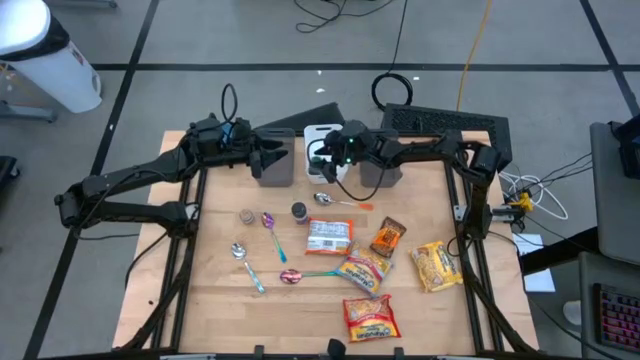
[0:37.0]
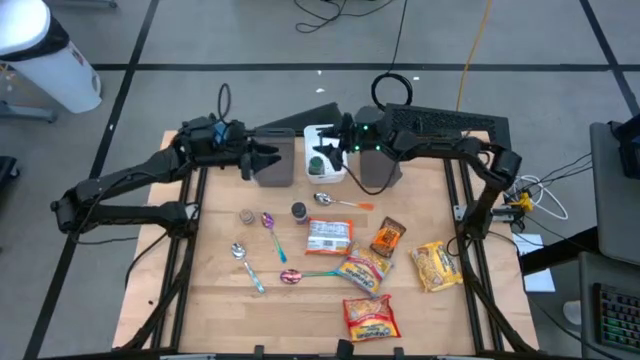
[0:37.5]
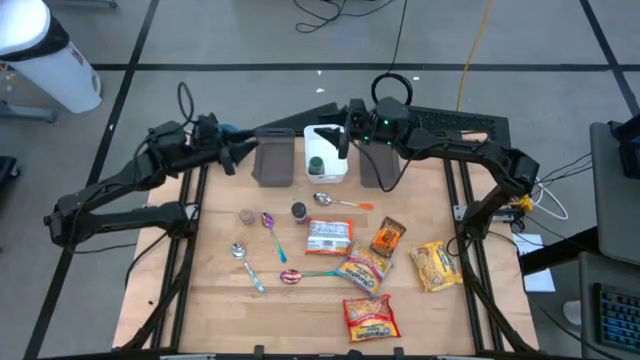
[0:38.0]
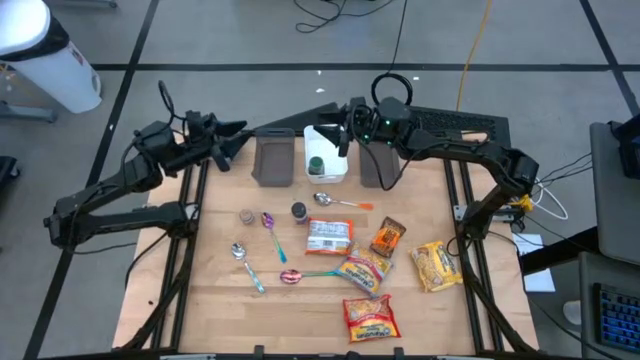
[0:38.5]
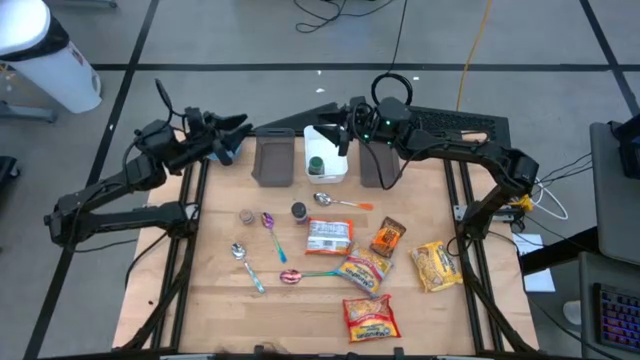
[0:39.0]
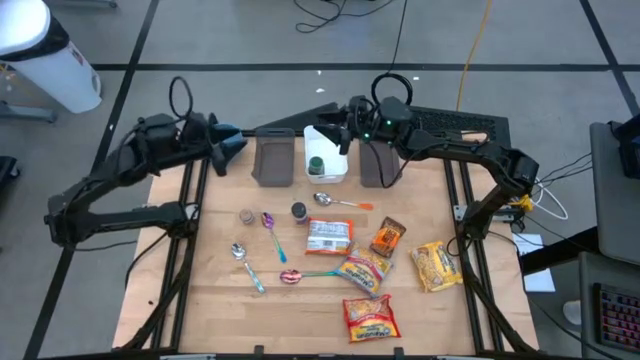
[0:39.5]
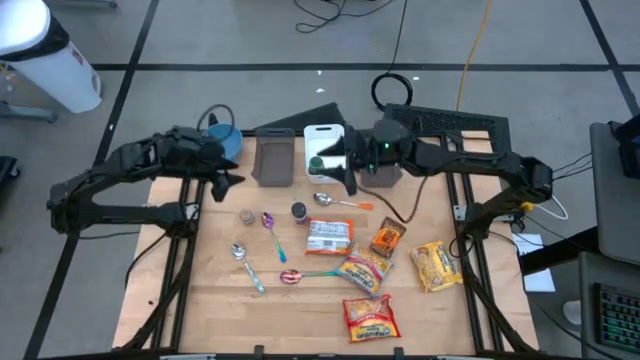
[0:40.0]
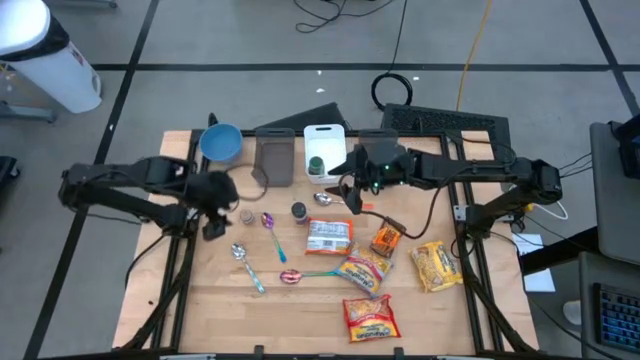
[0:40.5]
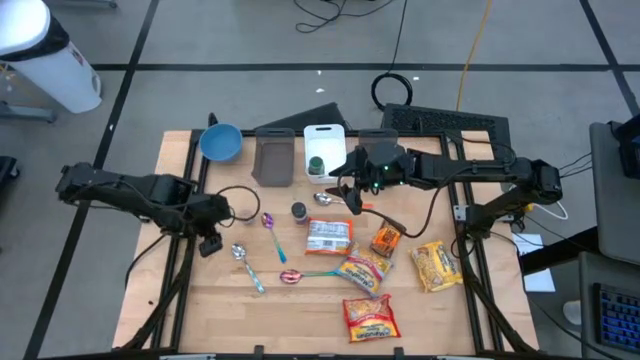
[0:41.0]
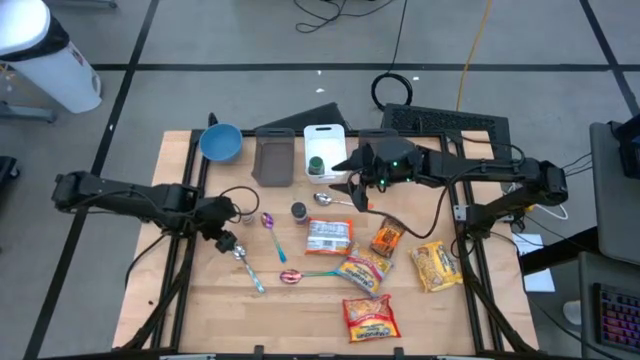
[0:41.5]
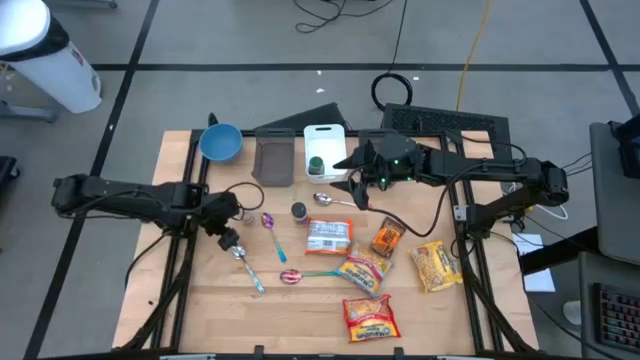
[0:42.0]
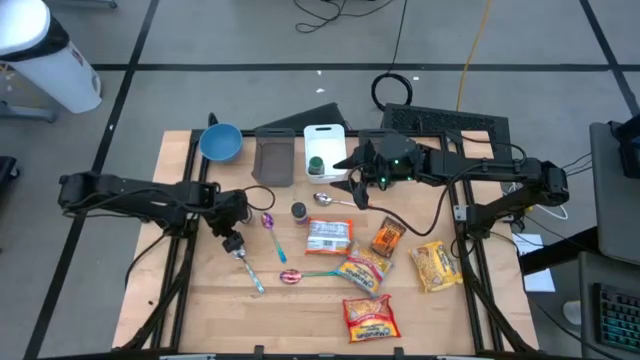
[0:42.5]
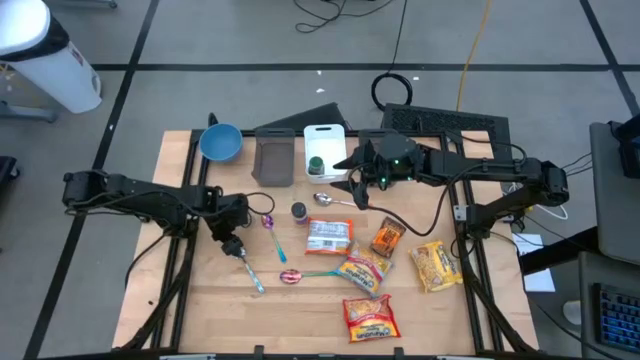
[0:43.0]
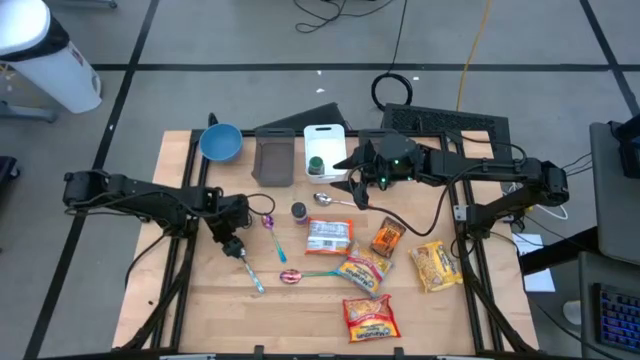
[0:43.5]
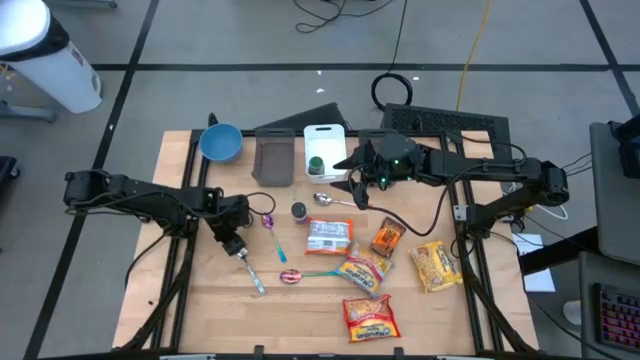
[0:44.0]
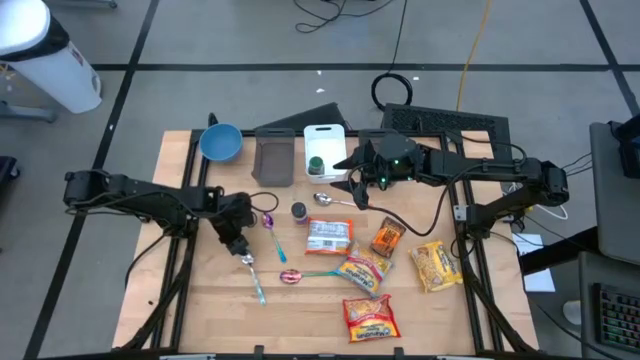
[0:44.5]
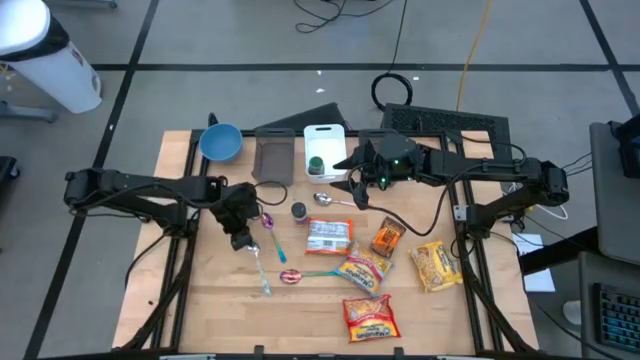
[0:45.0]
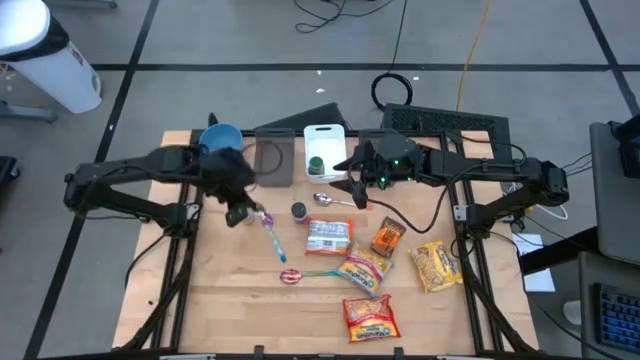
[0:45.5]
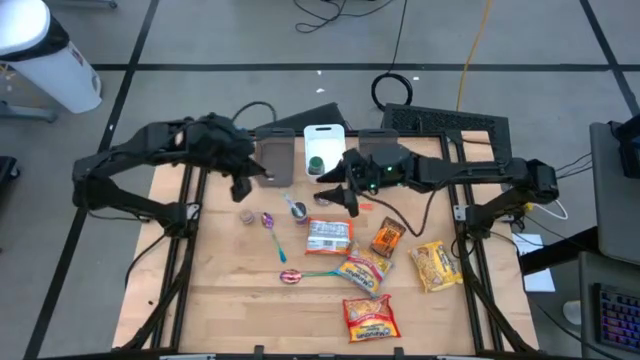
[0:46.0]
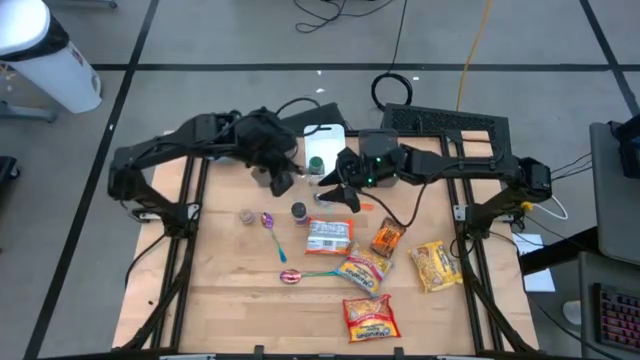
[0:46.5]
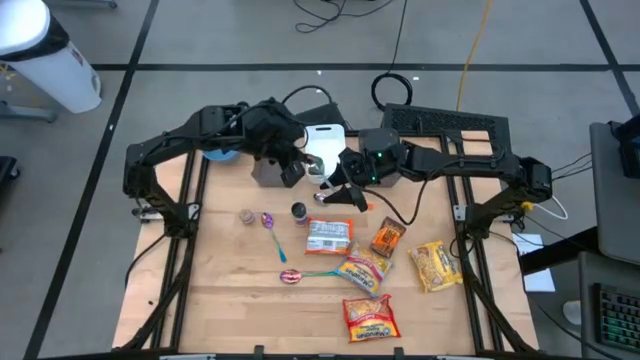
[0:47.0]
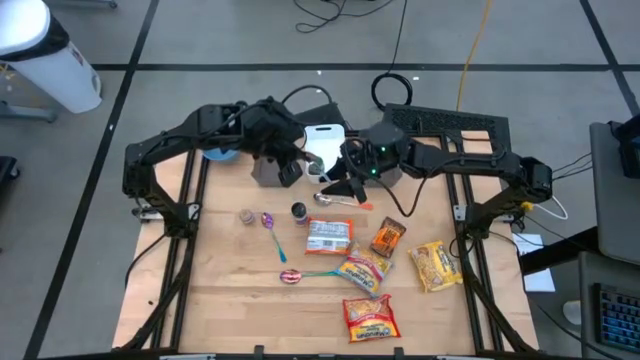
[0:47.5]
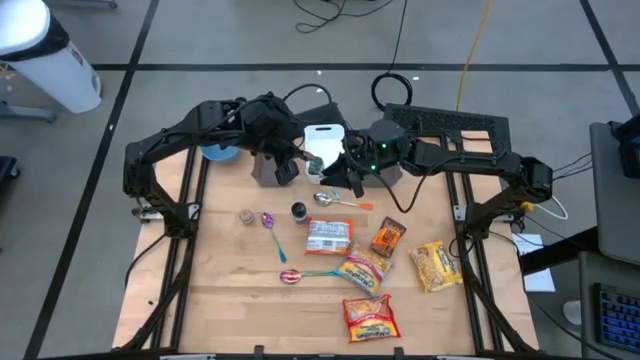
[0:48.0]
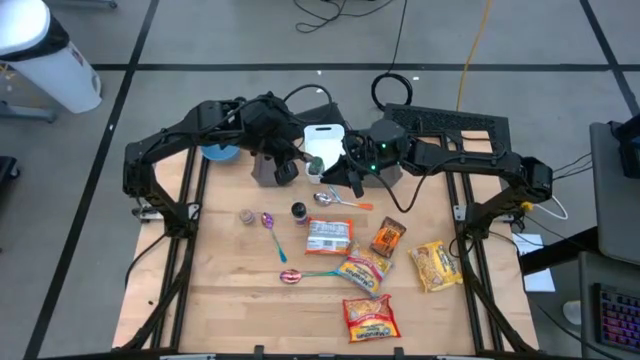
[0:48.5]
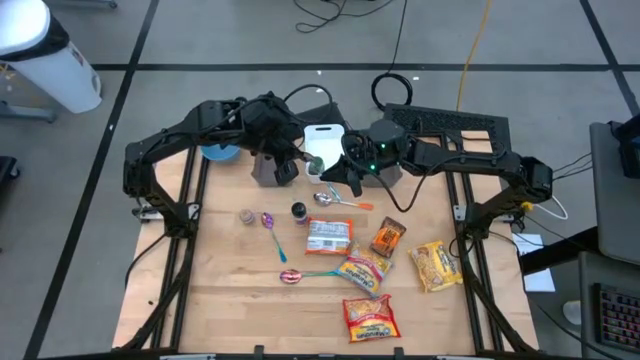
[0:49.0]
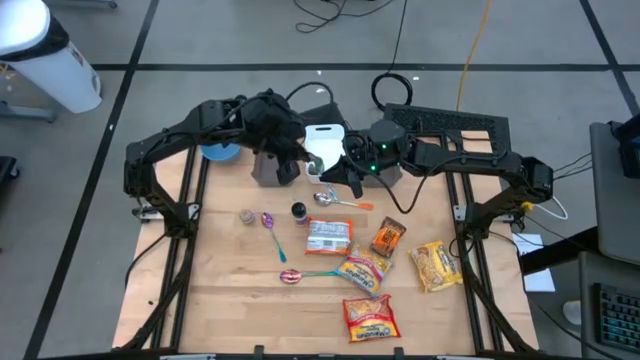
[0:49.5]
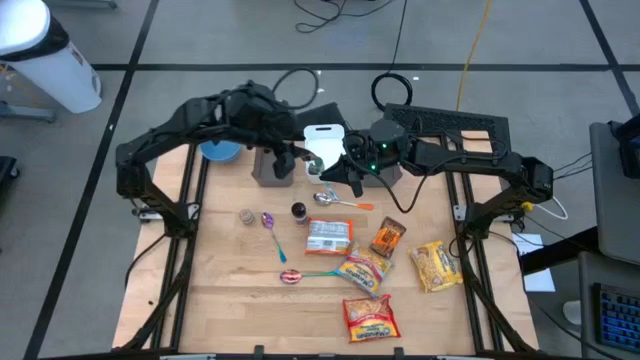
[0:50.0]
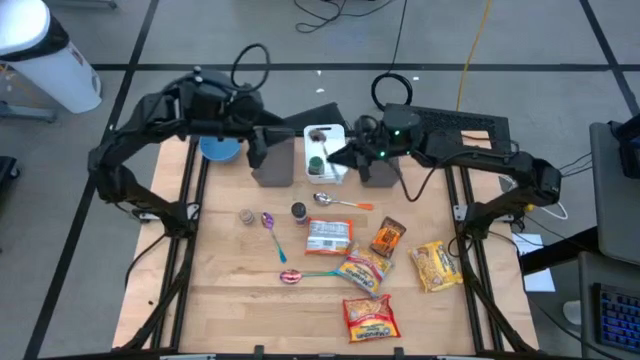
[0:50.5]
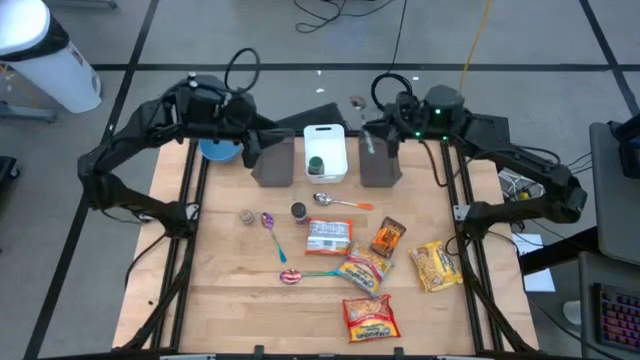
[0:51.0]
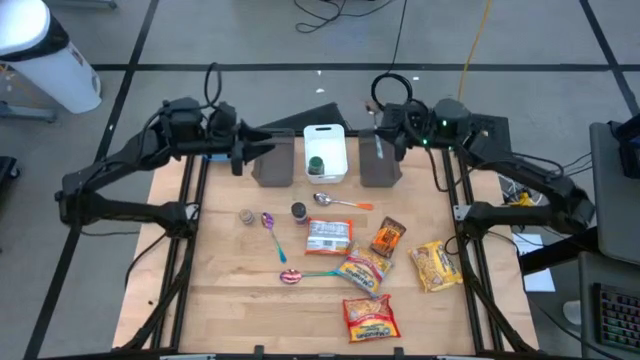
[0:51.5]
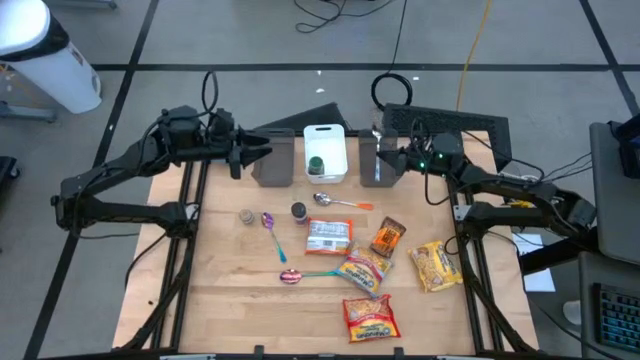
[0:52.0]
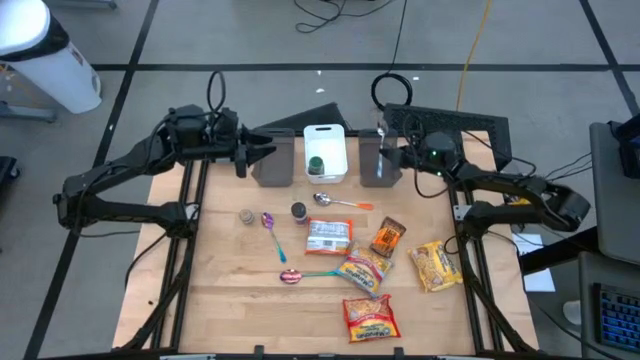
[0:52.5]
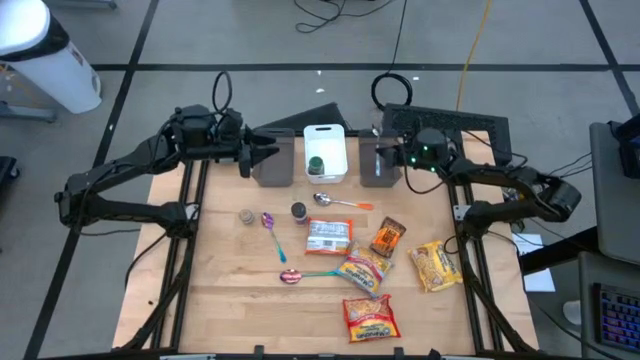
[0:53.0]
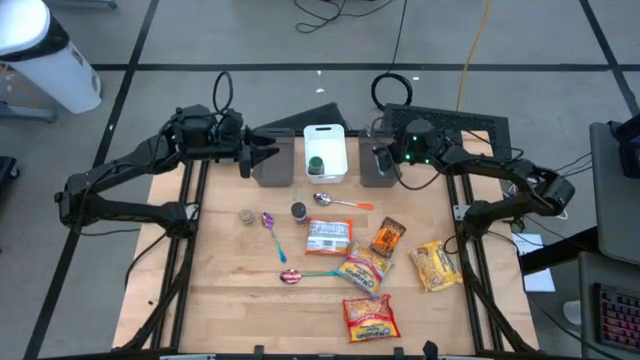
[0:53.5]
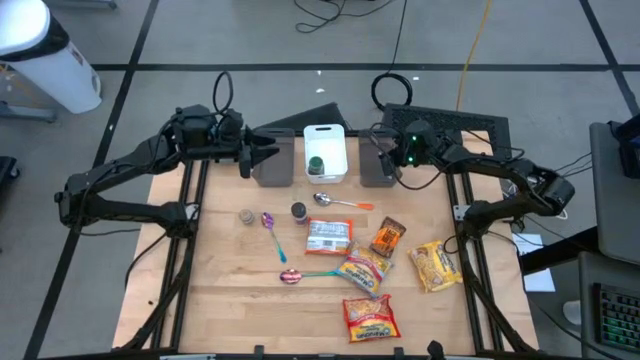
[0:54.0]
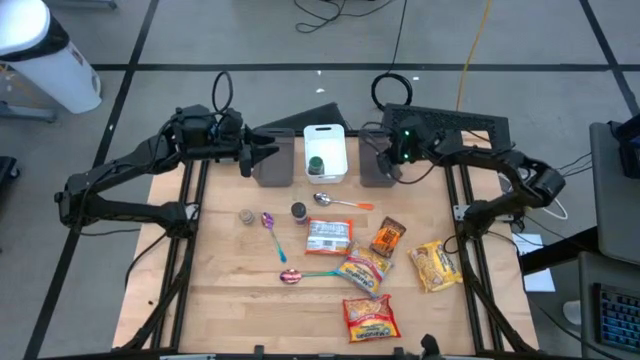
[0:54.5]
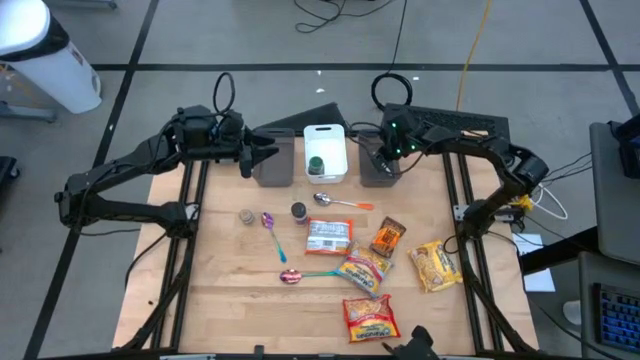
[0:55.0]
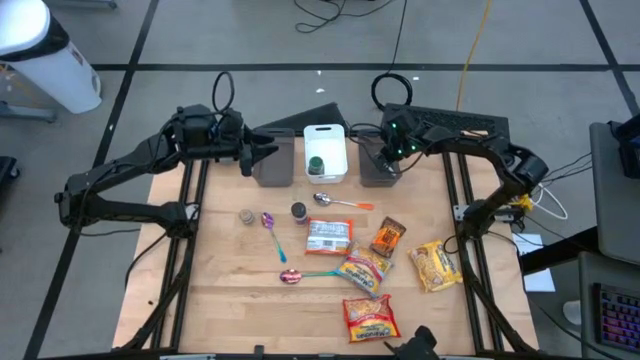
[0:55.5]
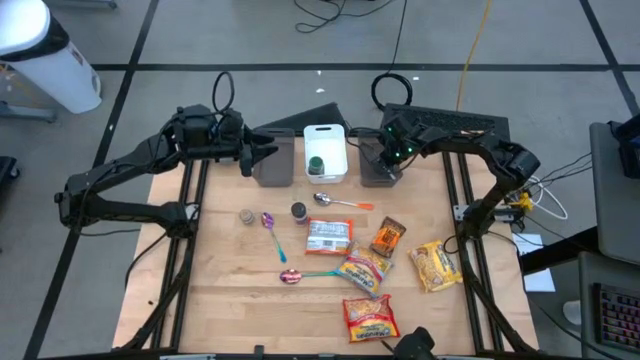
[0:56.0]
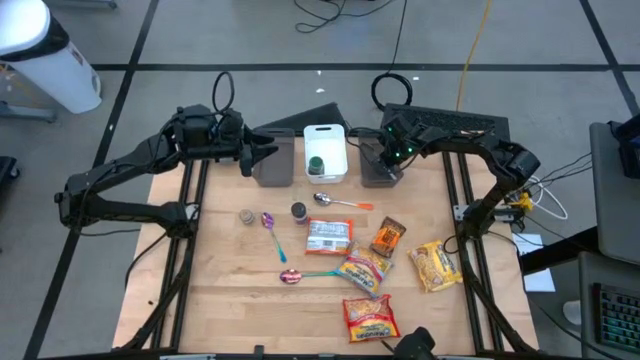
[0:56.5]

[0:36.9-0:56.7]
Task: Pick & Place Food Item
Put the white spoon into the right black bin
